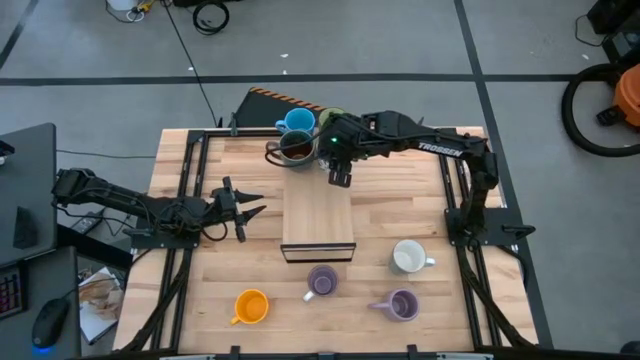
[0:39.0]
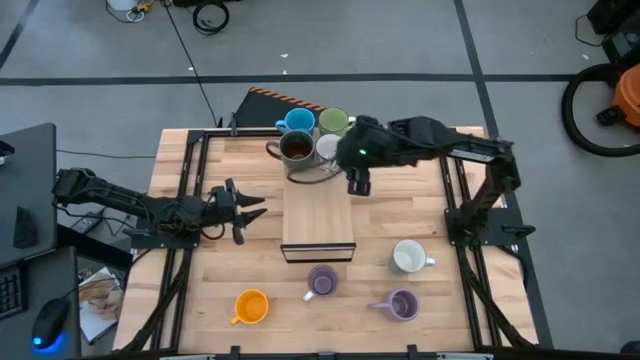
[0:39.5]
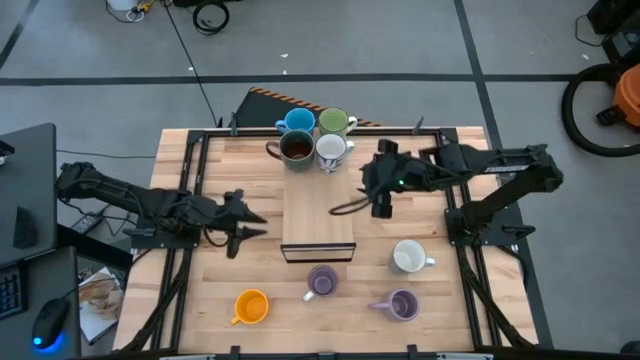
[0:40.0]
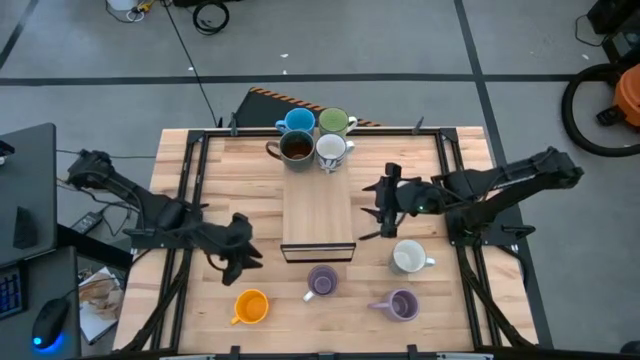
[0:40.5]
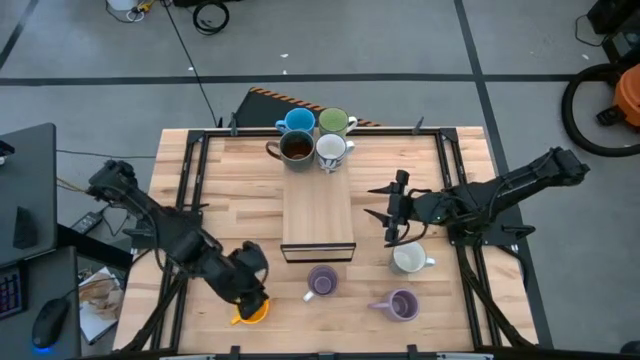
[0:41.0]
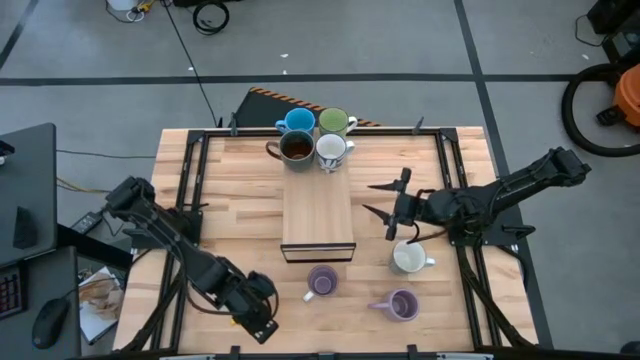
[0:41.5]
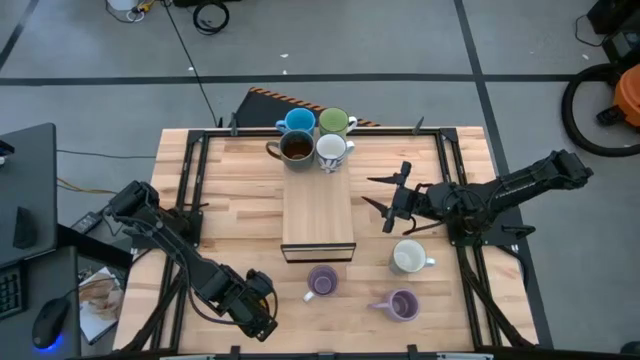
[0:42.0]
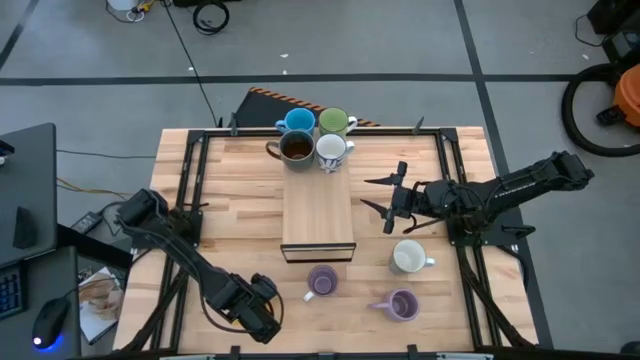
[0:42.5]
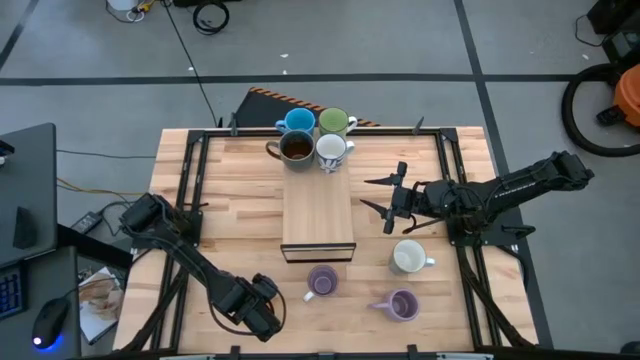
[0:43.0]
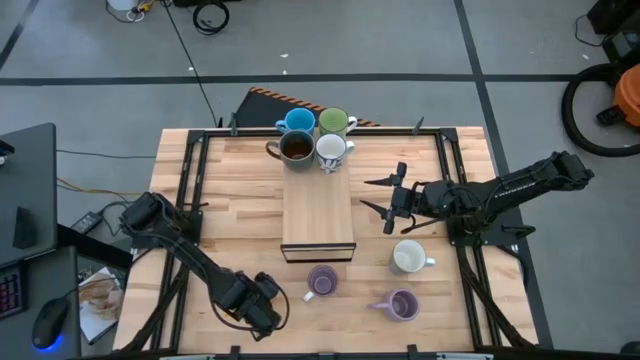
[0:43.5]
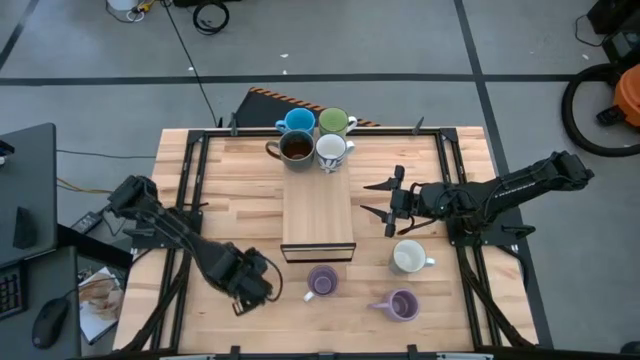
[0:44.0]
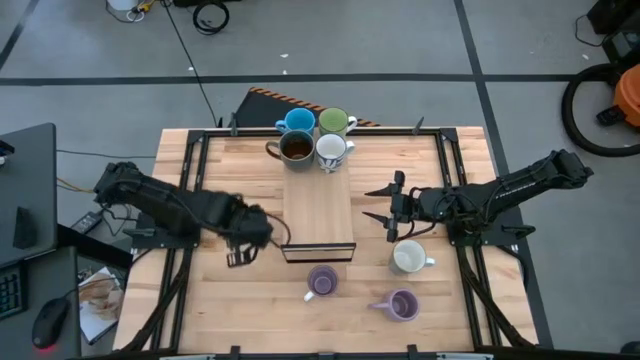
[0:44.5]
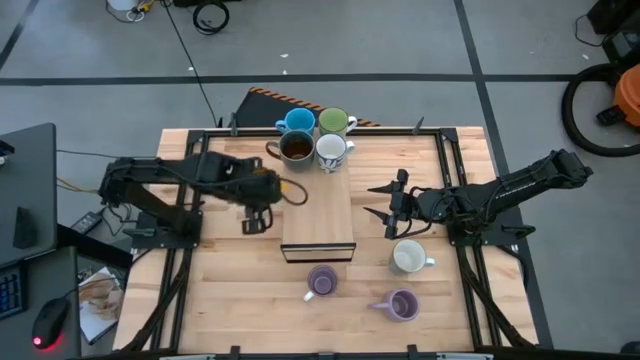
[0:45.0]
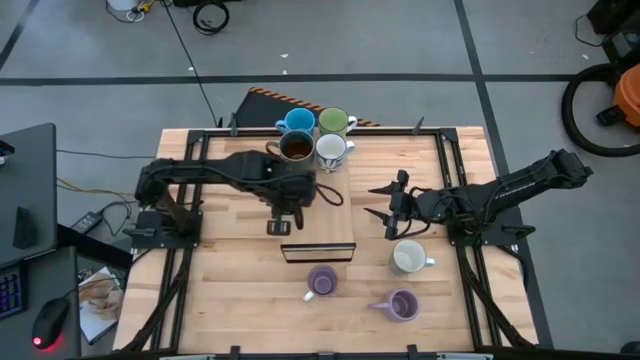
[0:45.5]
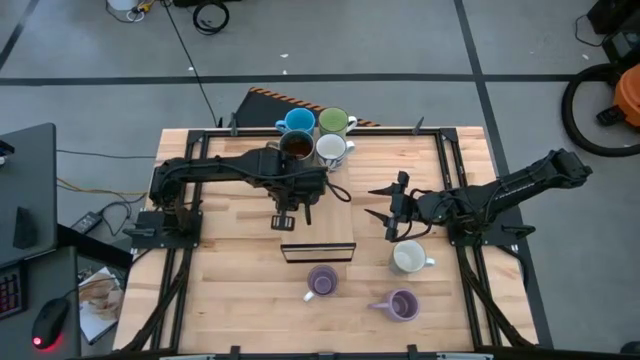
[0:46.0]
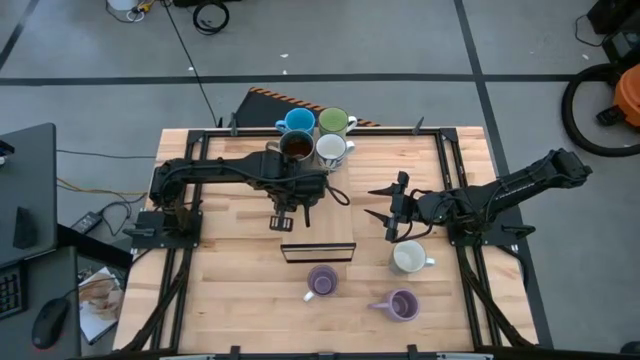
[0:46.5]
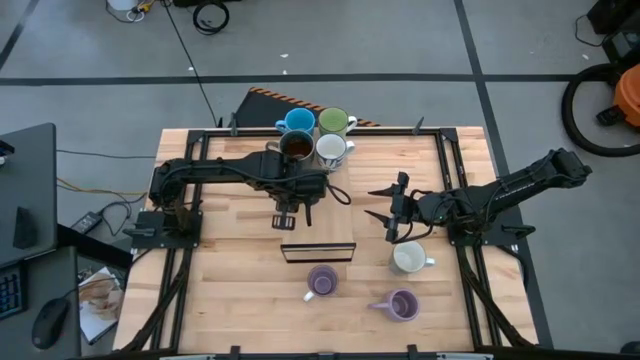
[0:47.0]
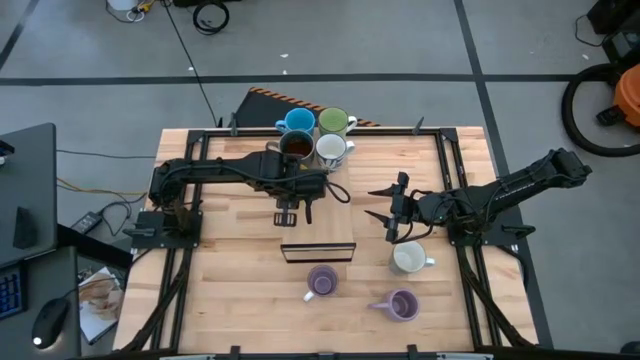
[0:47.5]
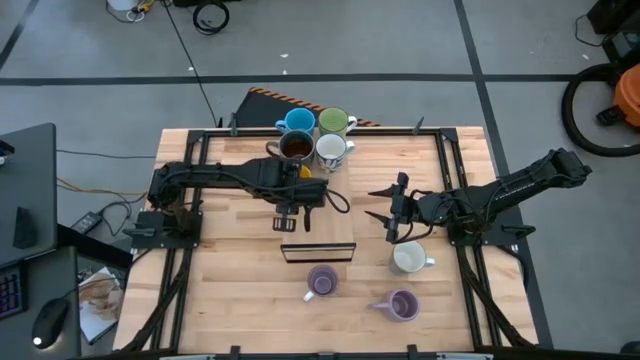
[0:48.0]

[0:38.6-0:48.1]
Task: Place coffee mugs
Put the yellow mug on the shelf

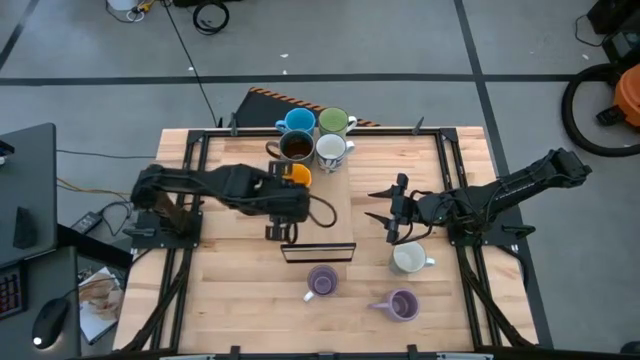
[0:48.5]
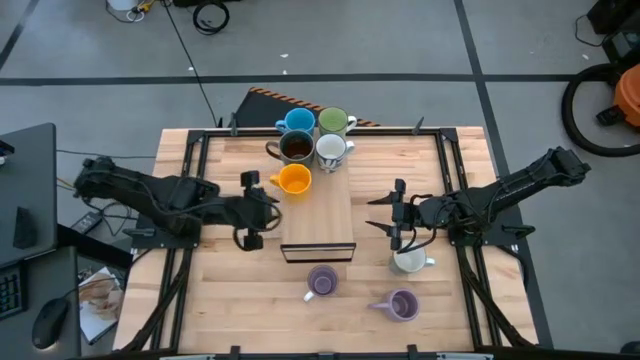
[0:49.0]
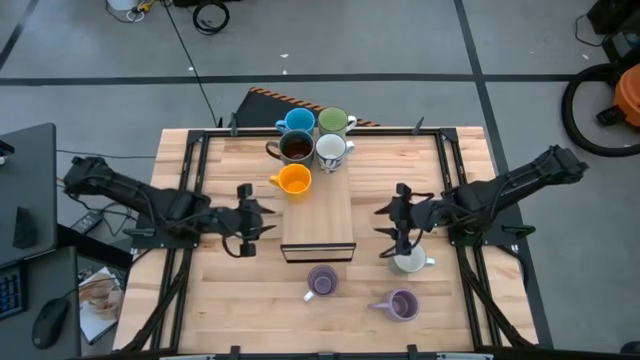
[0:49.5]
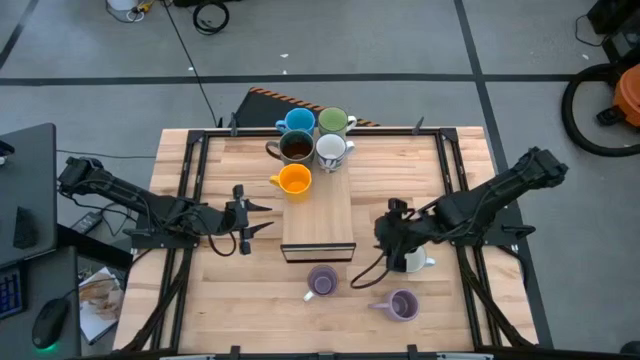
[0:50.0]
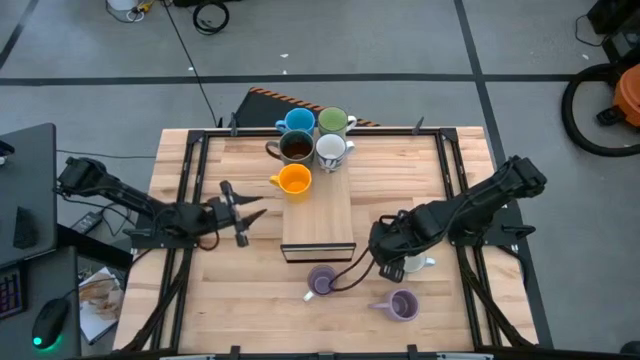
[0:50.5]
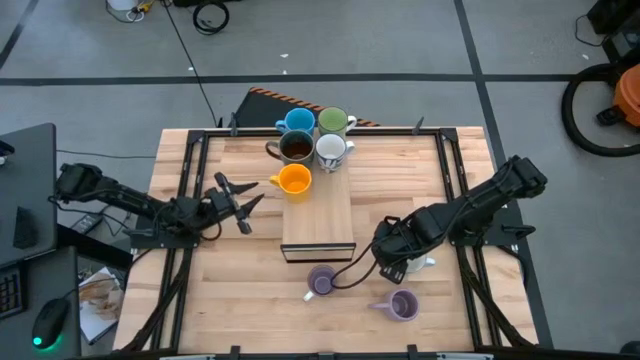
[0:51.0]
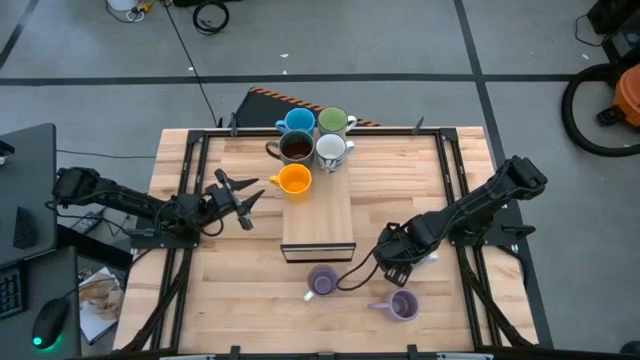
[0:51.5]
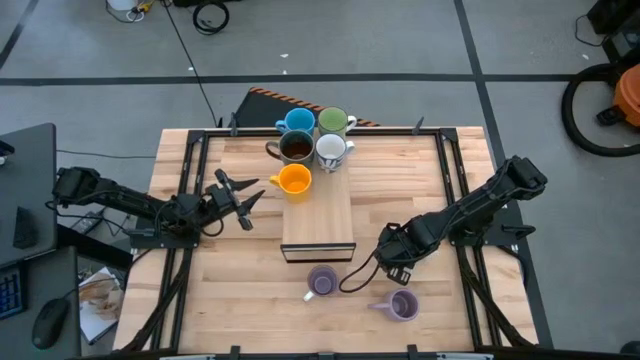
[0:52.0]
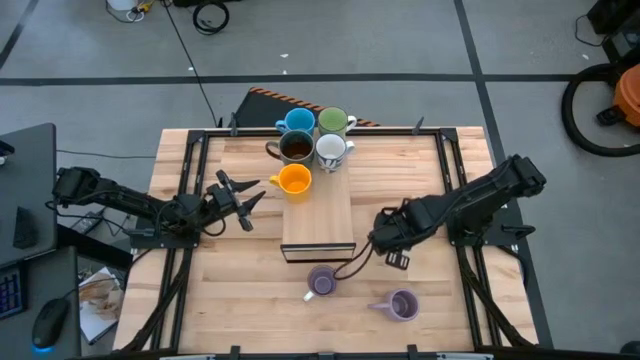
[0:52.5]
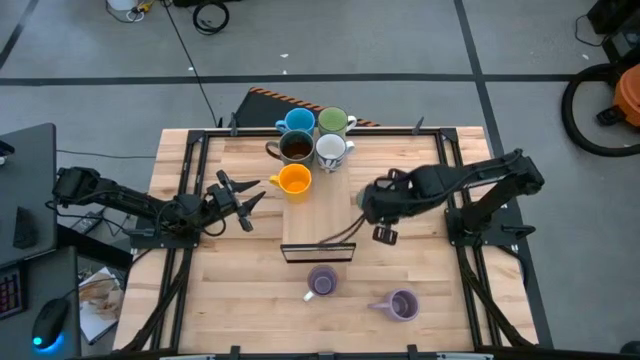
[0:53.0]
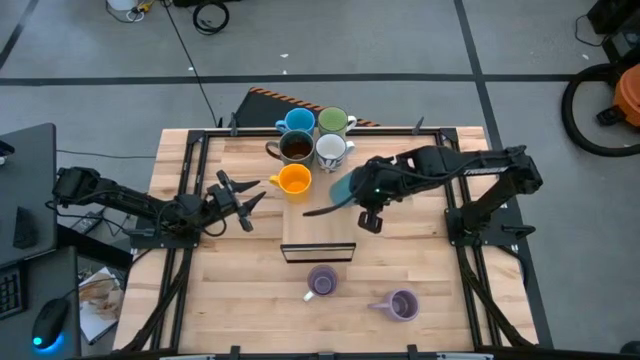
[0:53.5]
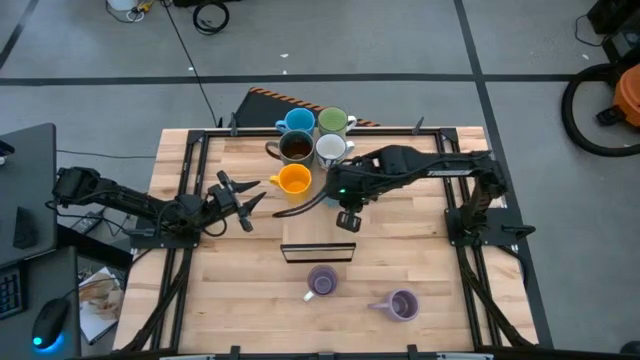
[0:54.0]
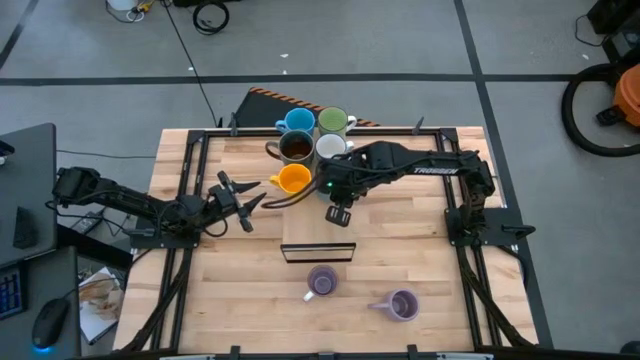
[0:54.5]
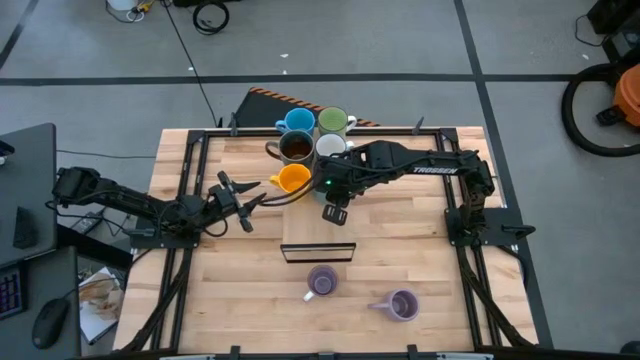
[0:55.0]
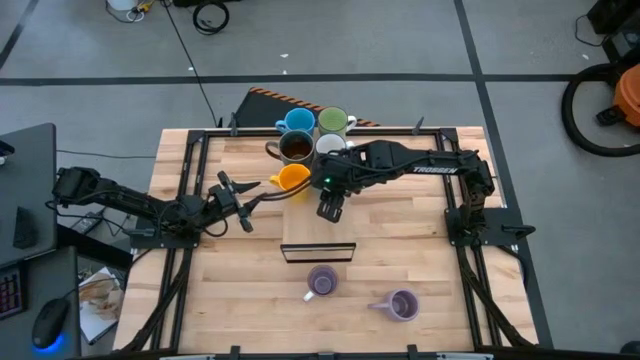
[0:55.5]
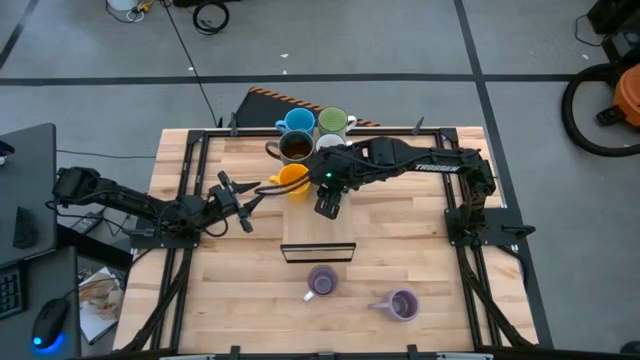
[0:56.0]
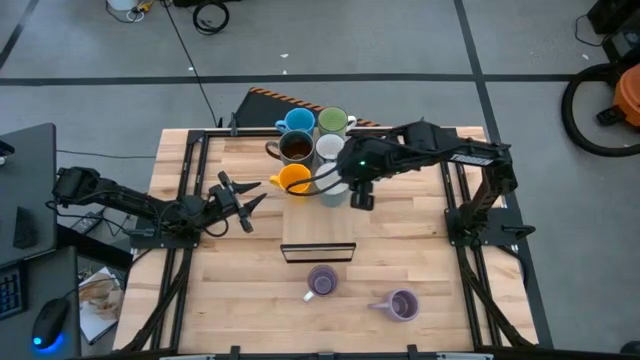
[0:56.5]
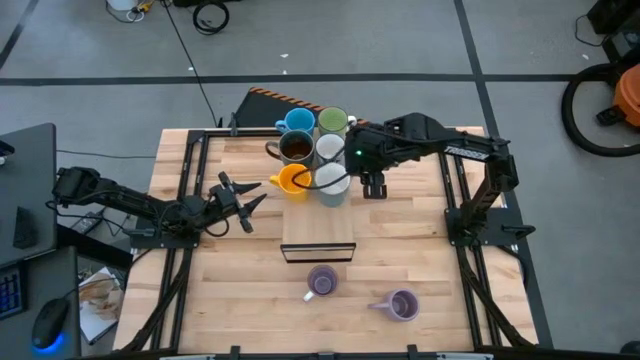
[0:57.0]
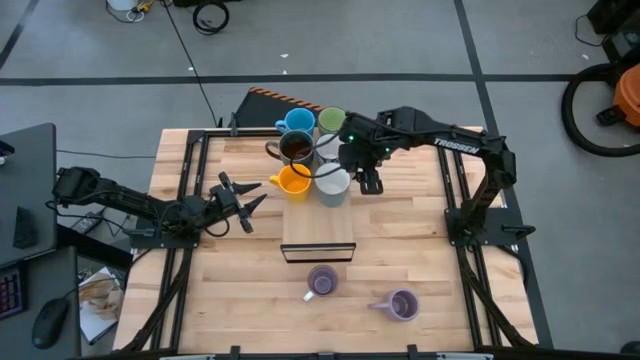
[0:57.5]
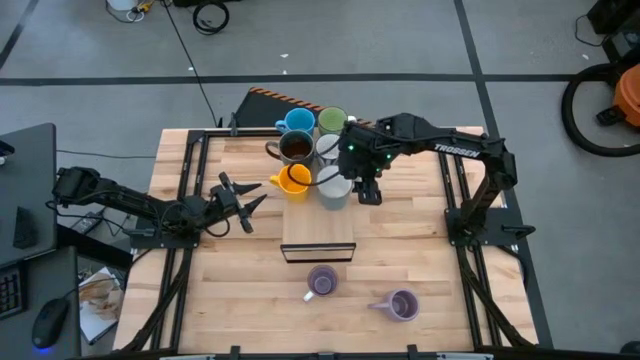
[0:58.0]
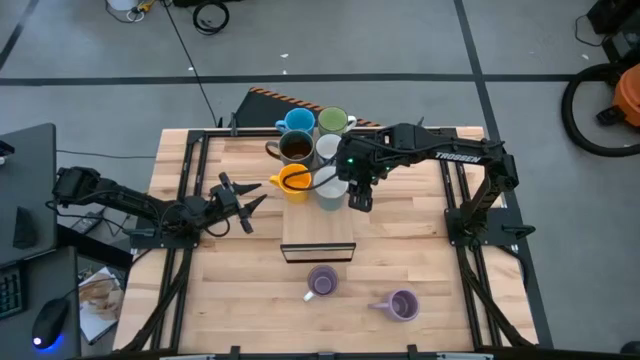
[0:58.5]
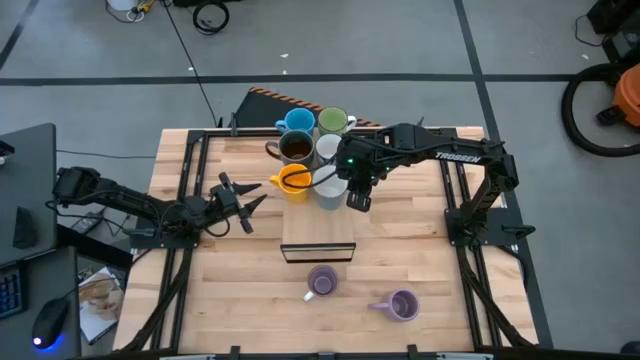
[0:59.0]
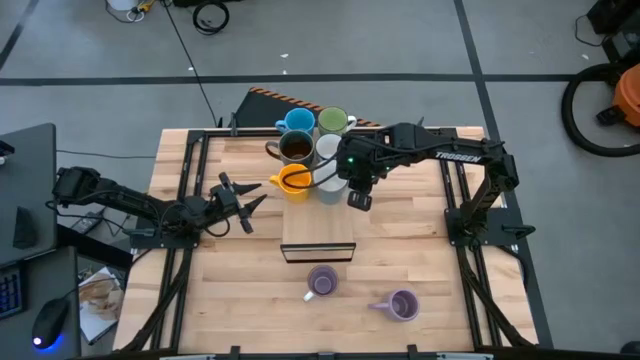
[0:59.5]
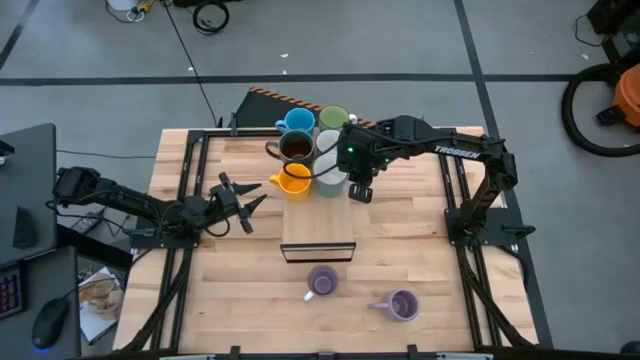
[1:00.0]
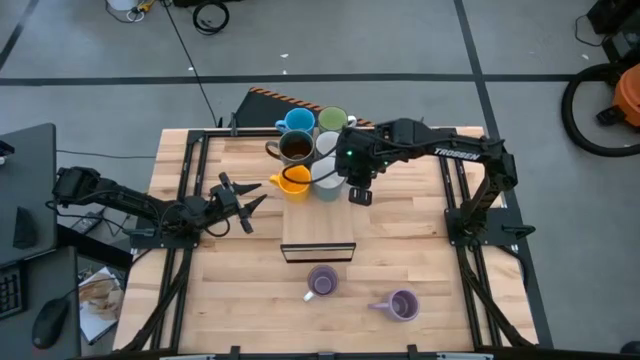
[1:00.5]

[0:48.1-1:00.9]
Put the light blue mug on the shelf

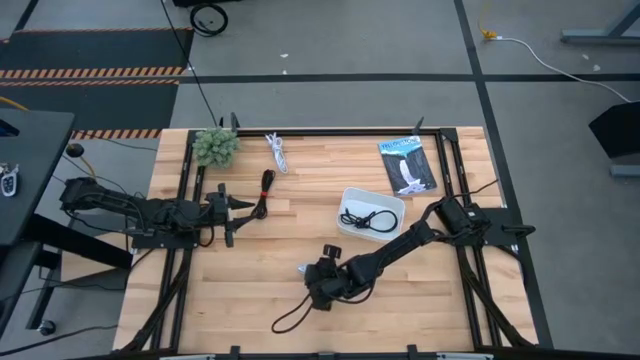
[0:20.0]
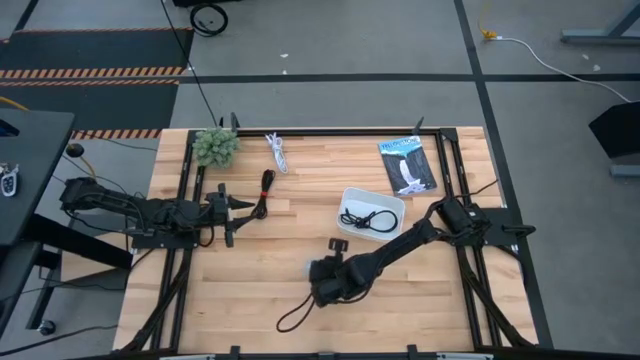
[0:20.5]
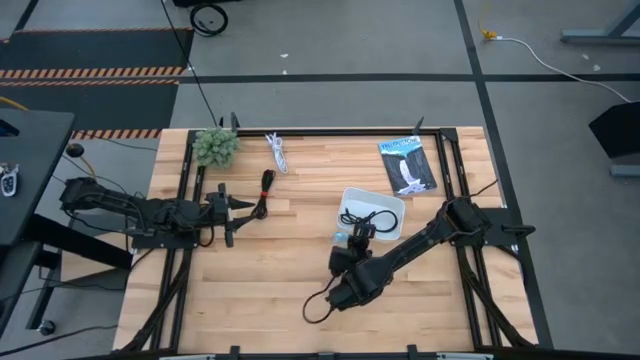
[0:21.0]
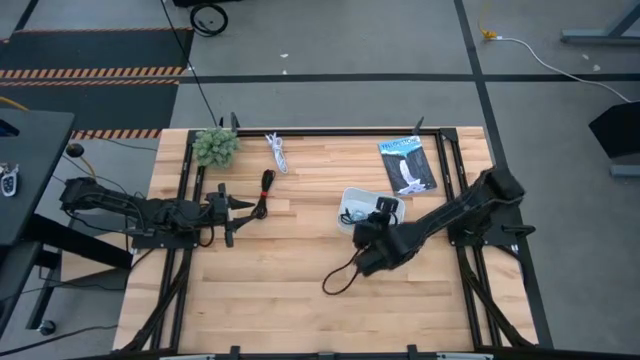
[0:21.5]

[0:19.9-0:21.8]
Task: Pick and place USB-C Cables
Put the light blue charger cable into the white bin
